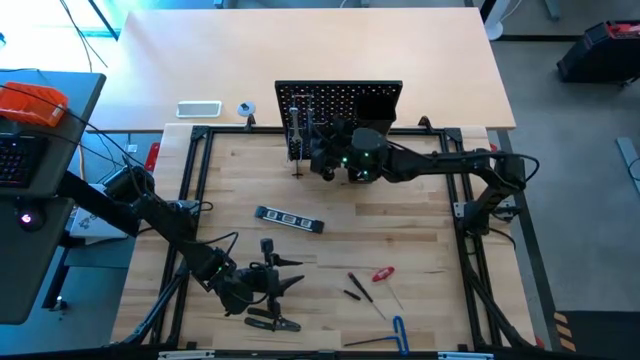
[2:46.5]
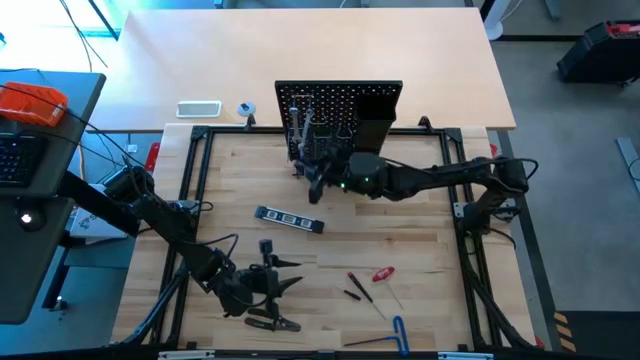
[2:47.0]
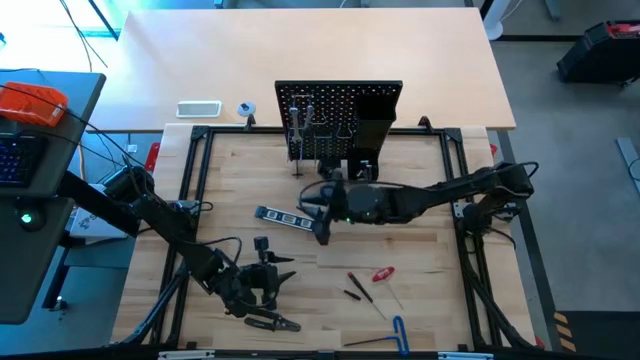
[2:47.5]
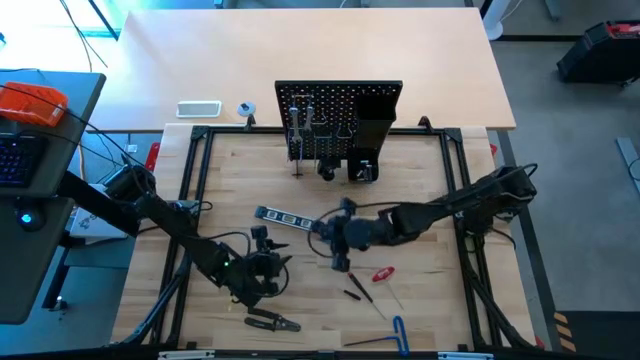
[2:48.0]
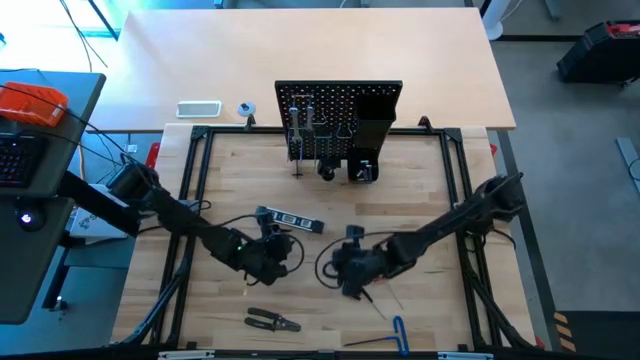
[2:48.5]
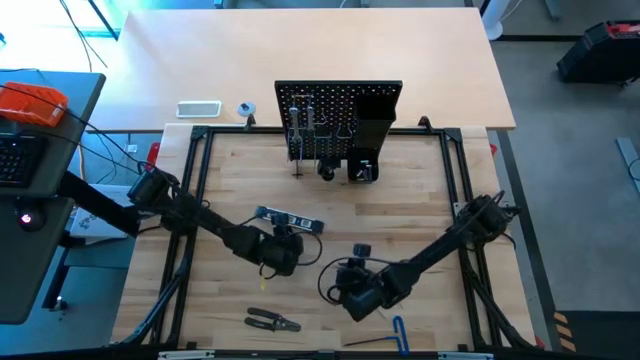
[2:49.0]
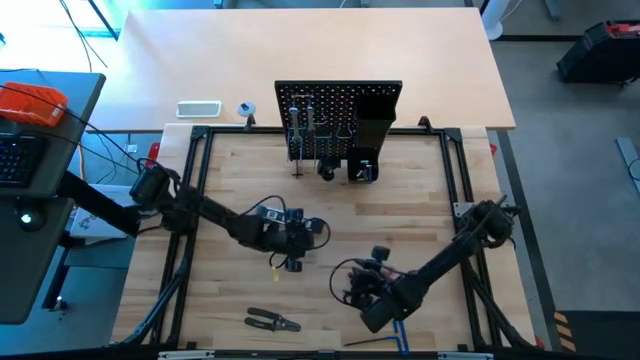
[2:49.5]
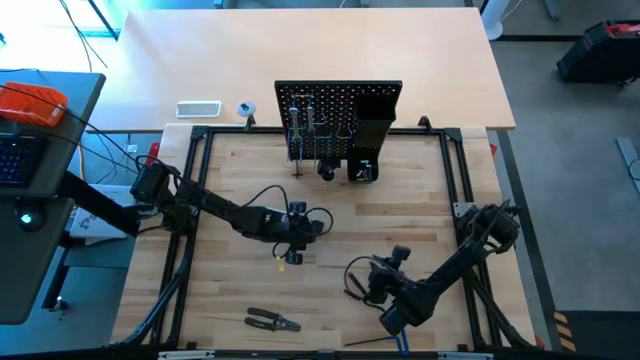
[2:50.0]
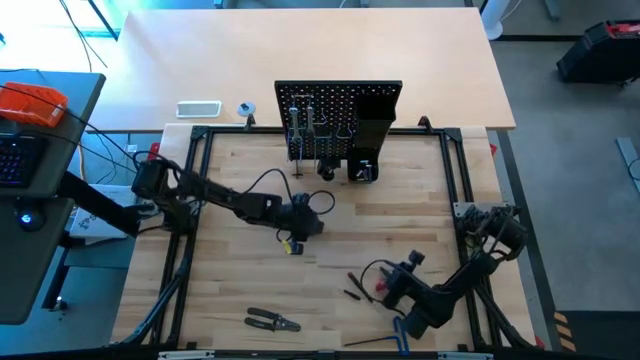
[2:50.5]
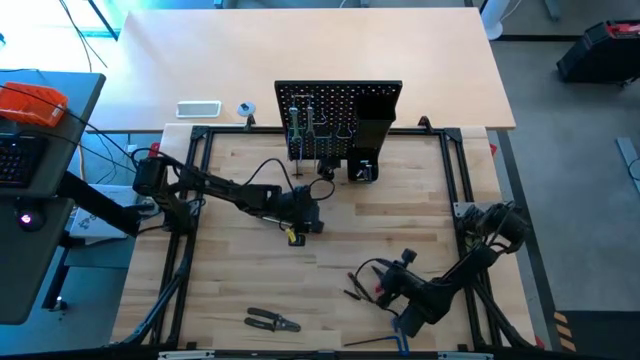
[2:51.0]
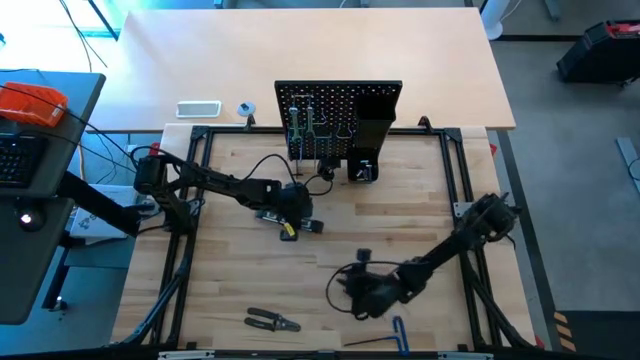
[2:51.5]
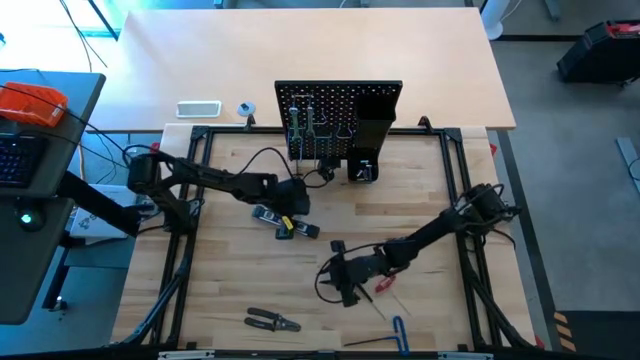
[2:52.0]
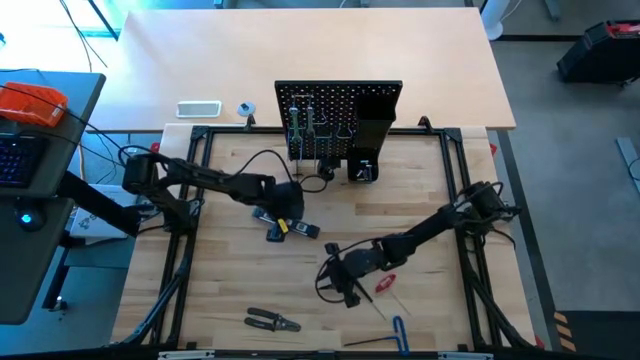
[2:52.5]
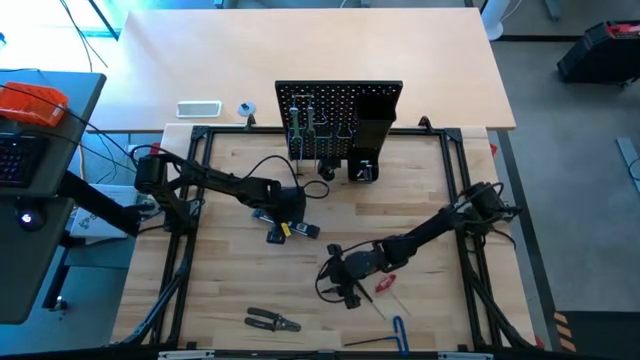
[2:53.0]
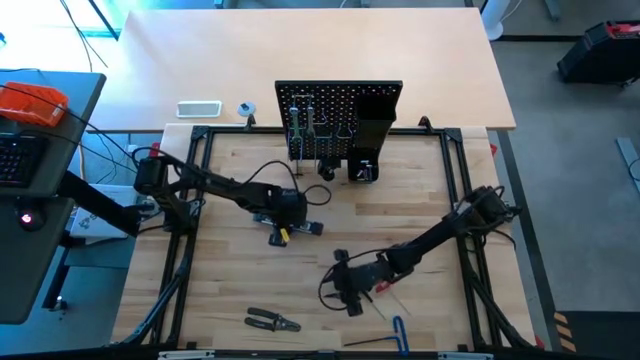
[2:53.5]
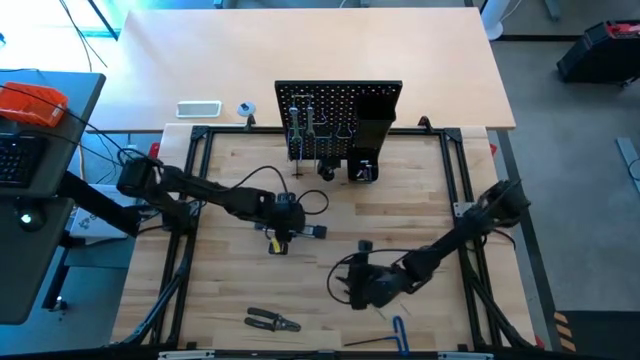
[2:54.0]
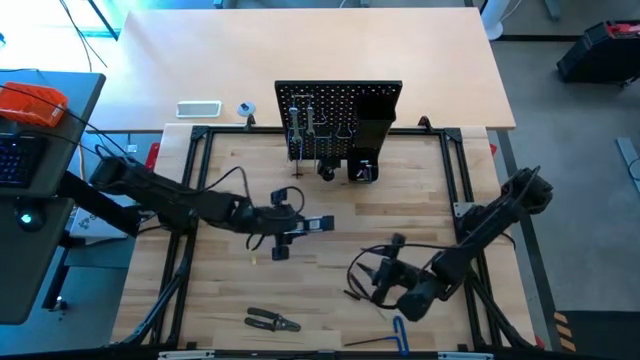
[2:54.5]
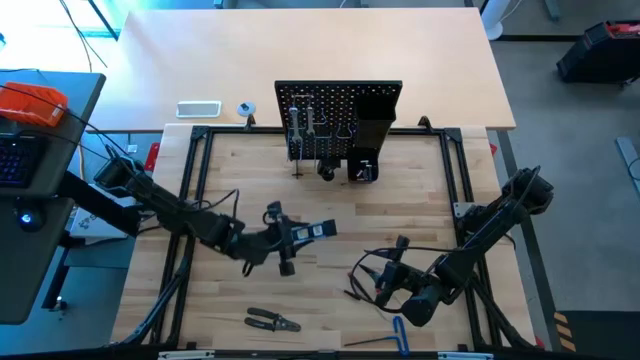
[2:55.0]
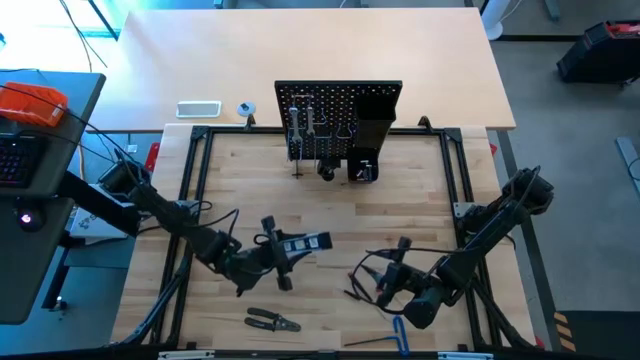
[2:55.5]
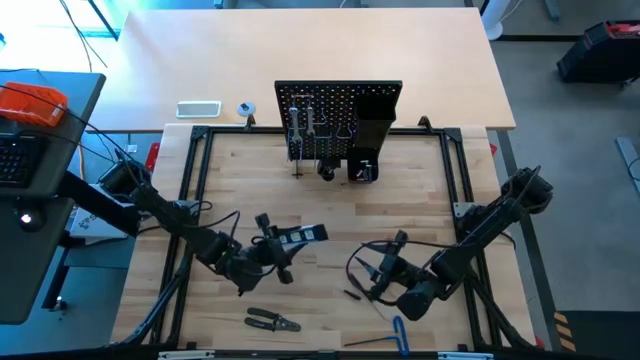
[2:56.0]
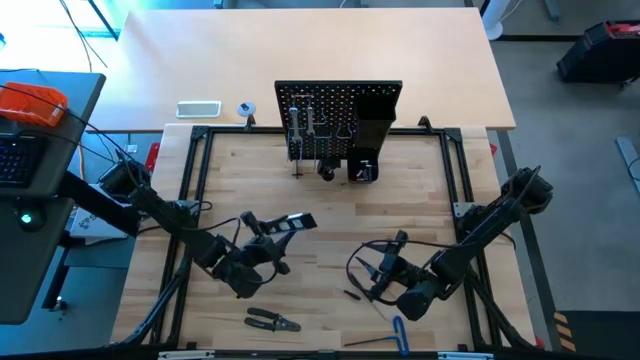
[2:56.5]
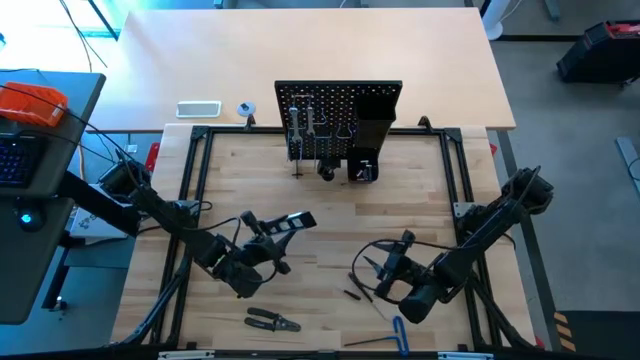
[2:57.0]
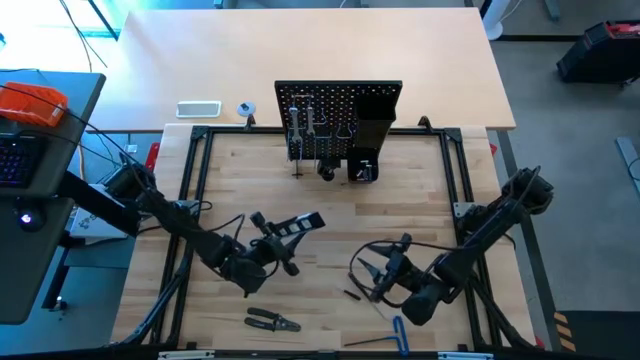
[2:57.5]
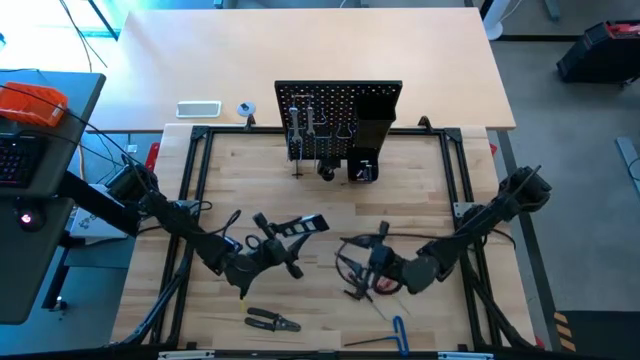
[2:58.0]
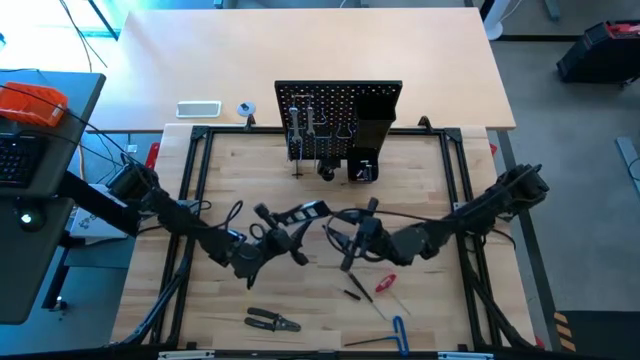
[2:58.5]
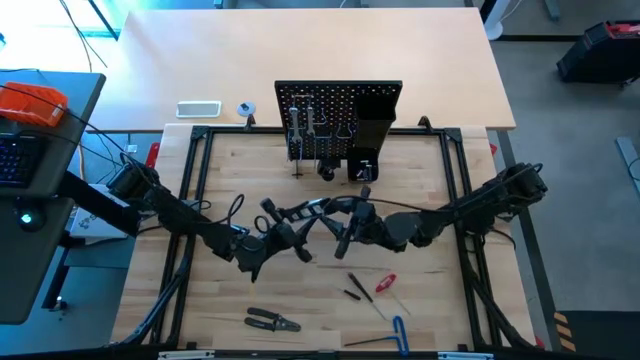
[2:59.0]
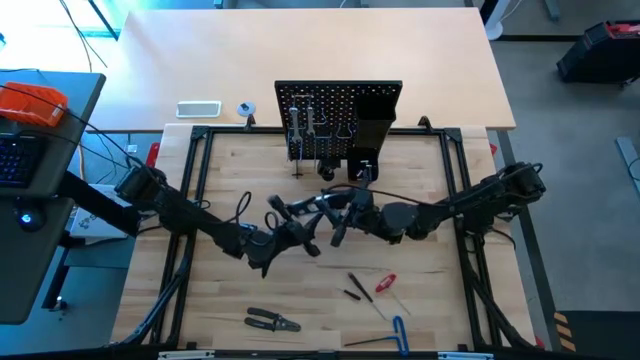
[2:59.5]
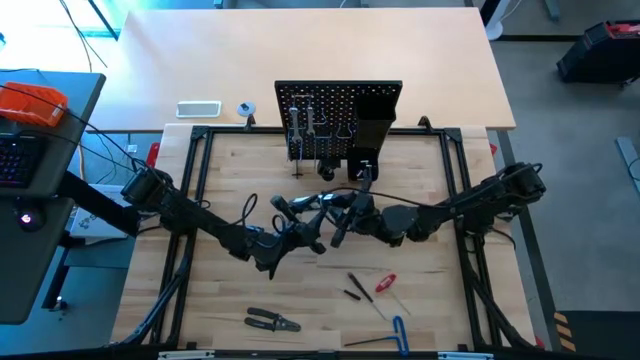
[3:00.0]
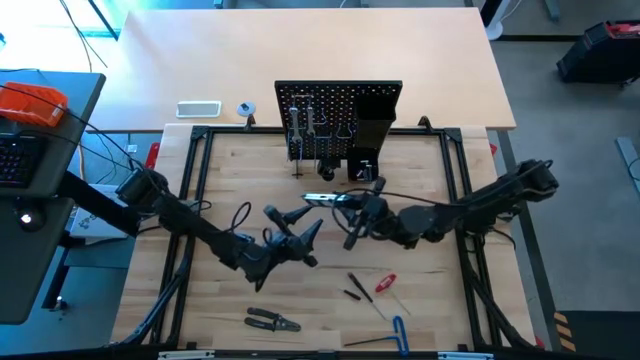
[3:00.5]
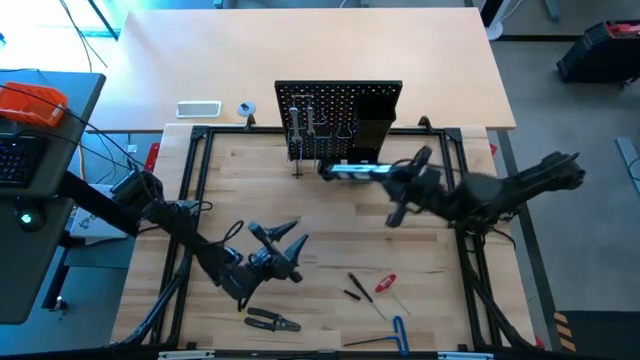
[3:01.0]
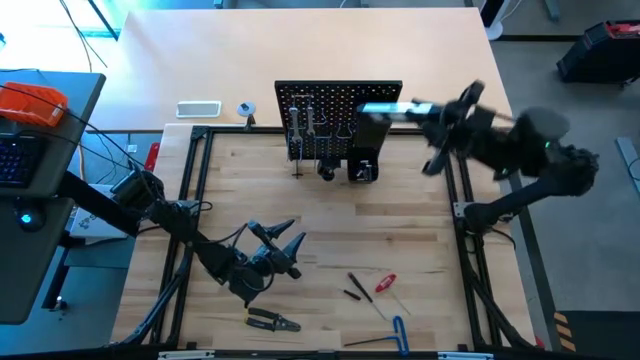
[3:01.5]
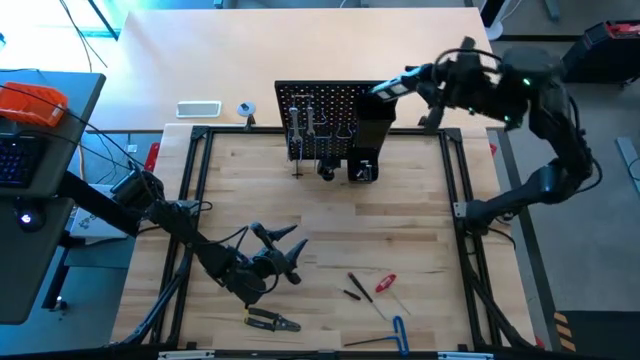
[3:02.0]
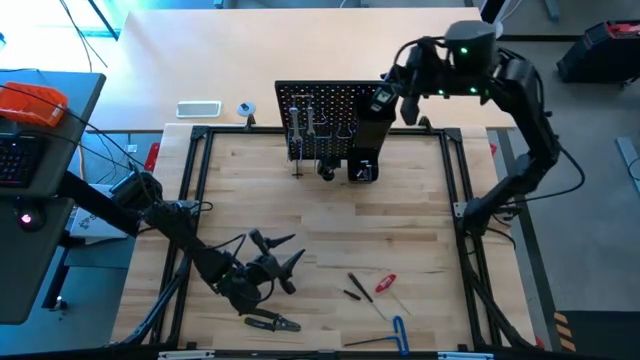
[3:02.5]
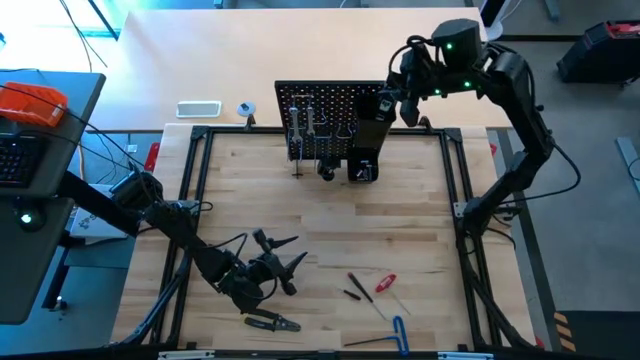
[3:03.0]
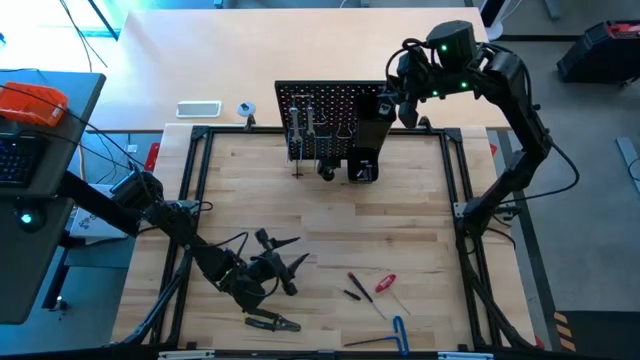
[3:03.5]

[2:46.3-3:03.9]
Task: Hang tools onto peg board
Put the spirit level into the top peg board bin

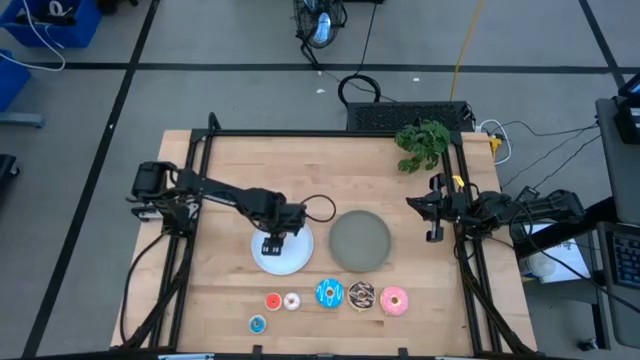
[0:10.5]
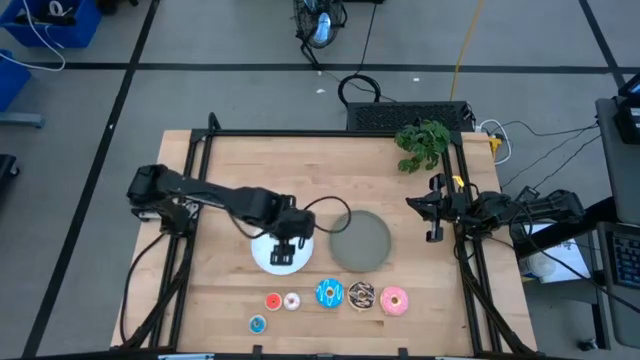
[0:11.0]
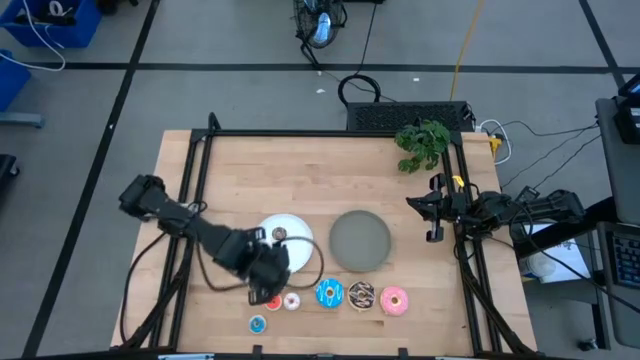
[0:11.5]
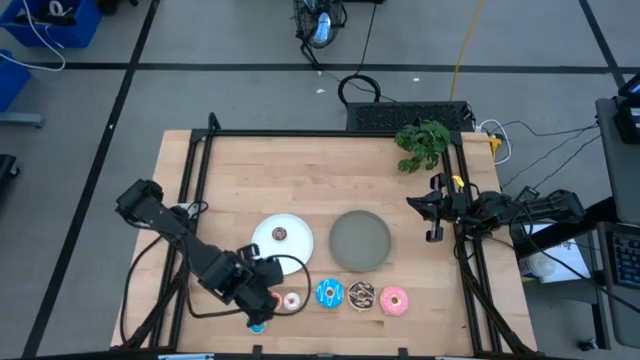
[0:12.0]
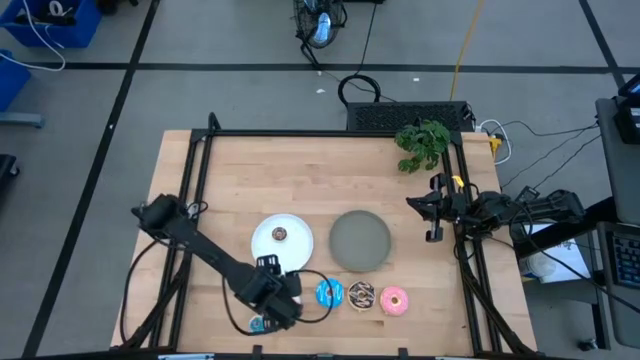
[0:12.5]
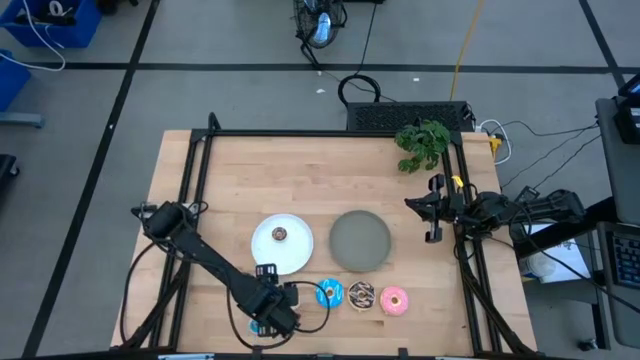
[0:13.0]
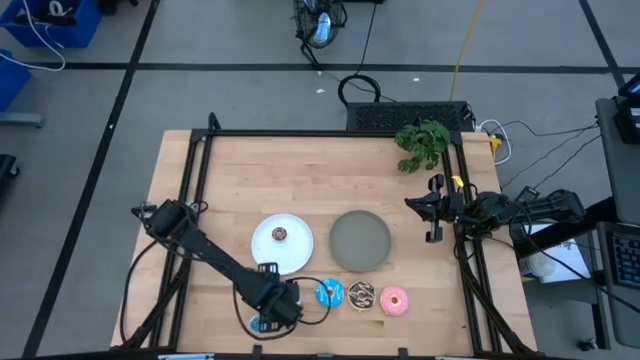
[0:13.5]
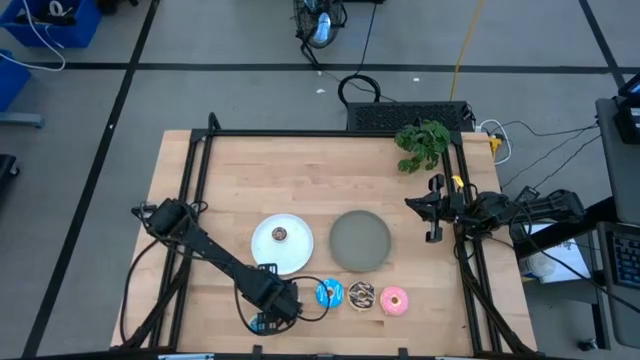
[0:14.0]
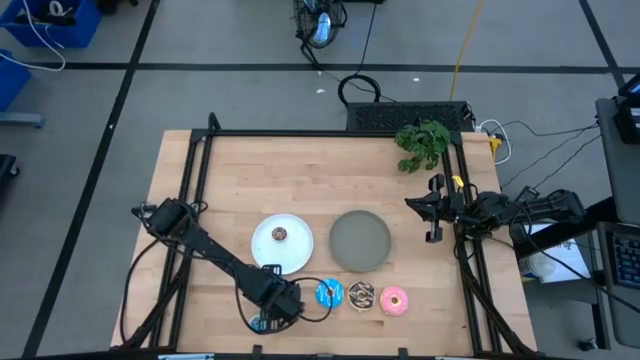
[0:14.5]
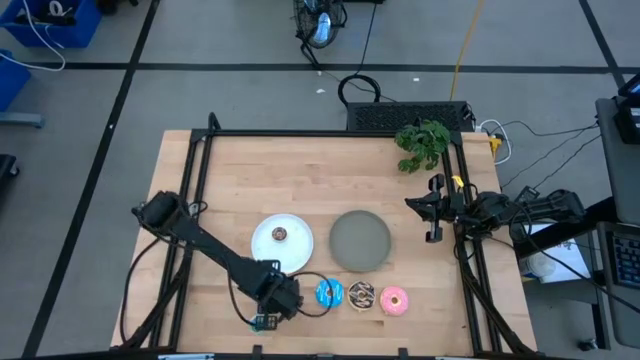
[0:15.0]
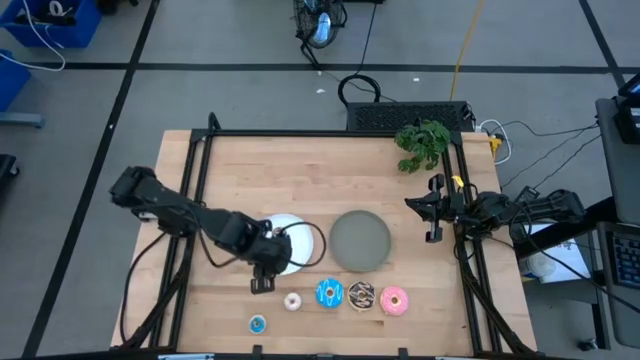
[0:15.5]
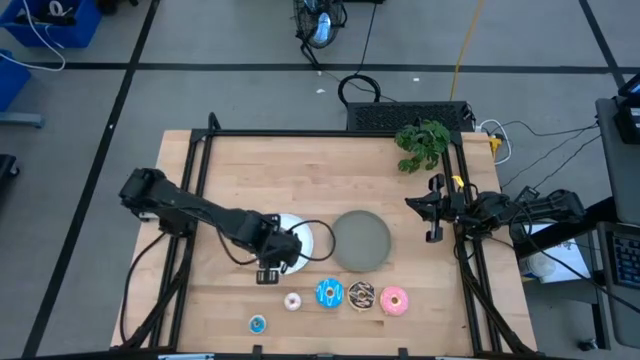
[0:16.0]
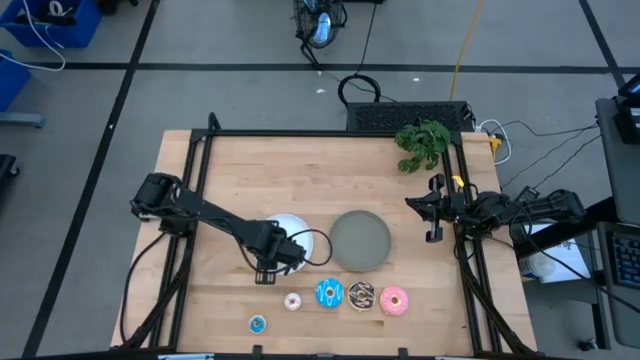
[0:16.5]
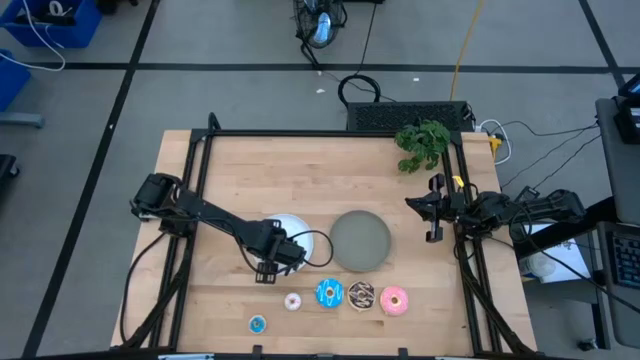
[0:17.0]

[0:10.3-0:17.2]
Task: Pick & Place donuts
Put the small orange donut on the white plate
